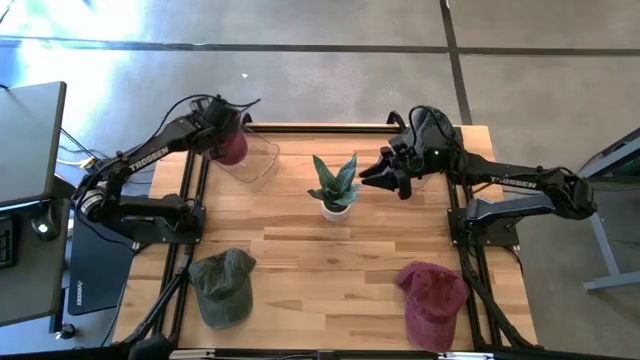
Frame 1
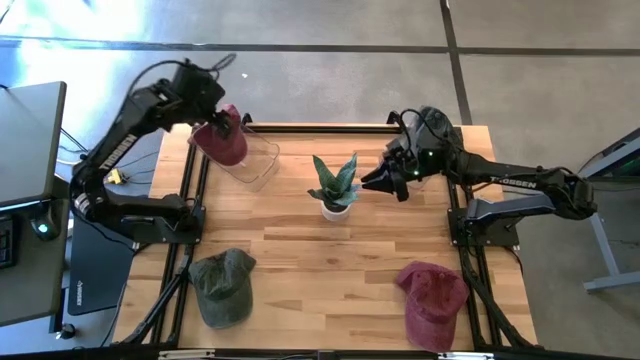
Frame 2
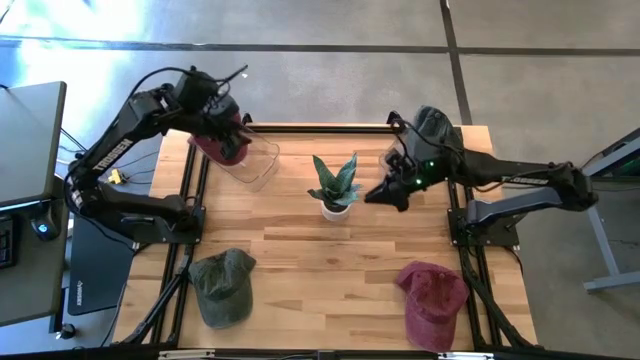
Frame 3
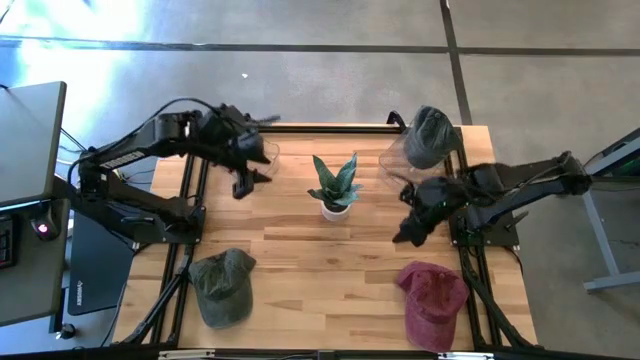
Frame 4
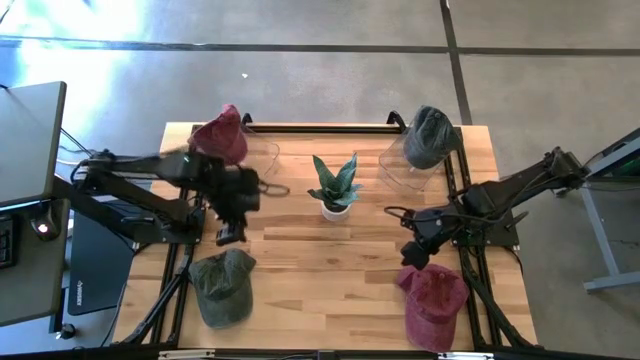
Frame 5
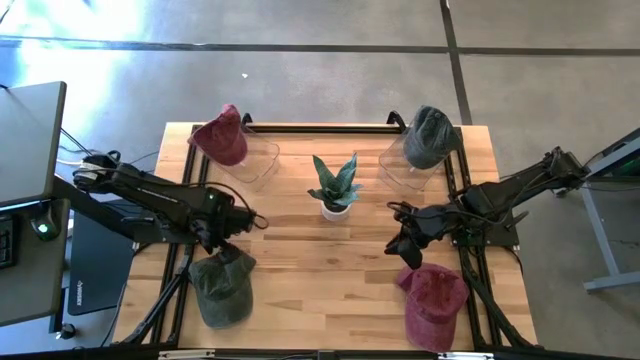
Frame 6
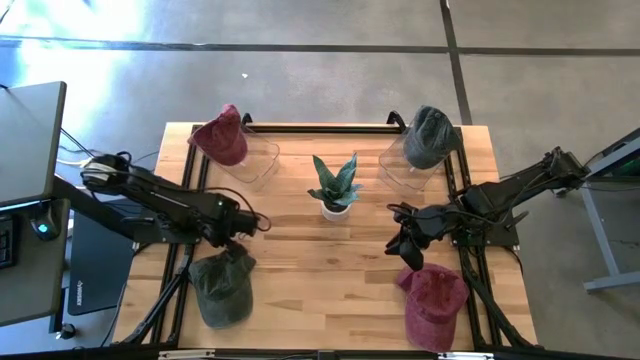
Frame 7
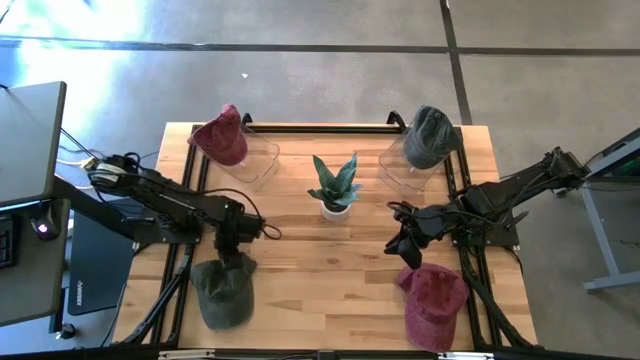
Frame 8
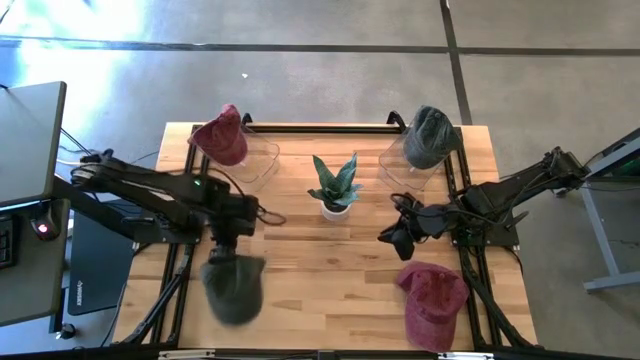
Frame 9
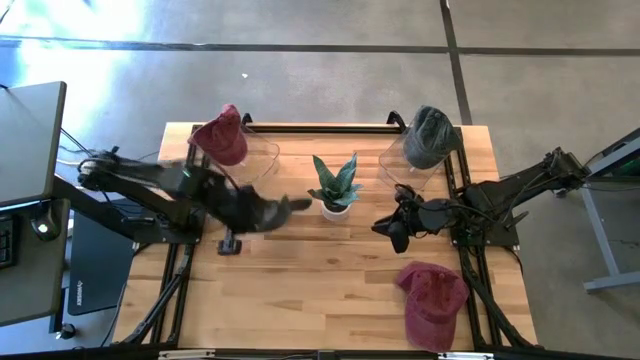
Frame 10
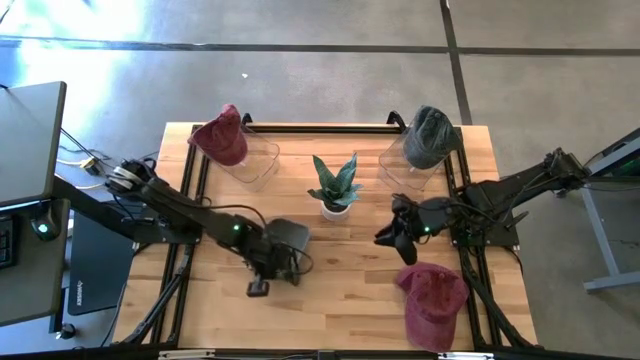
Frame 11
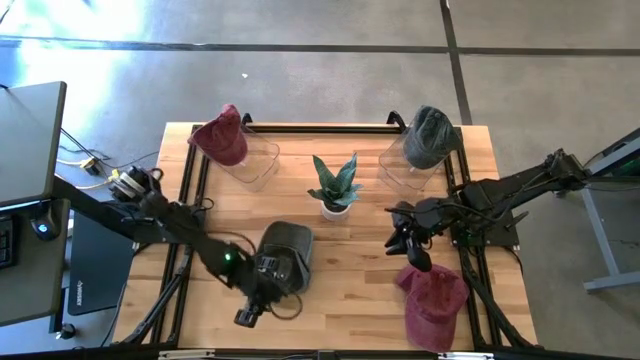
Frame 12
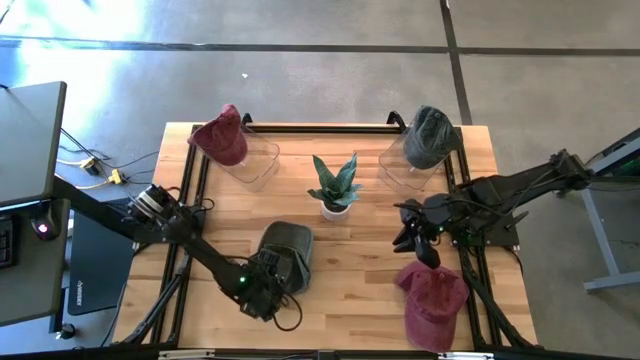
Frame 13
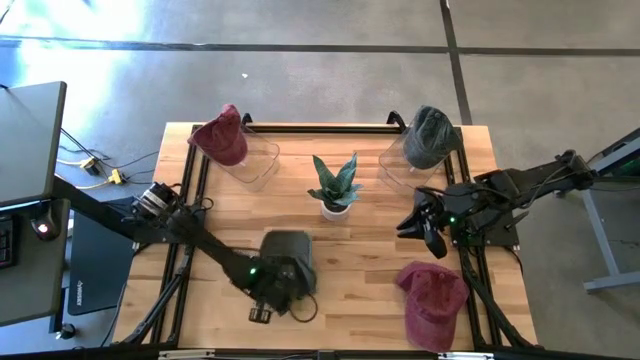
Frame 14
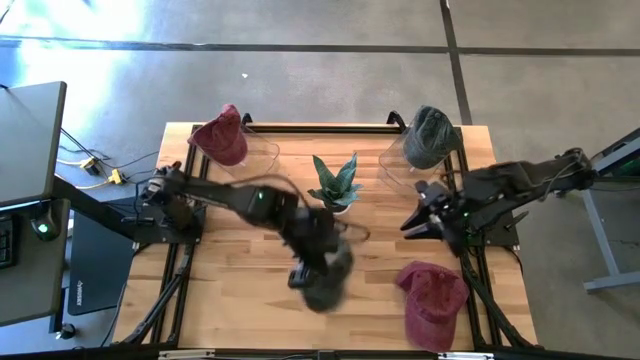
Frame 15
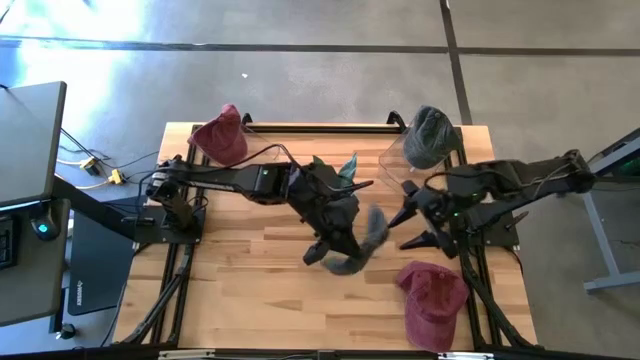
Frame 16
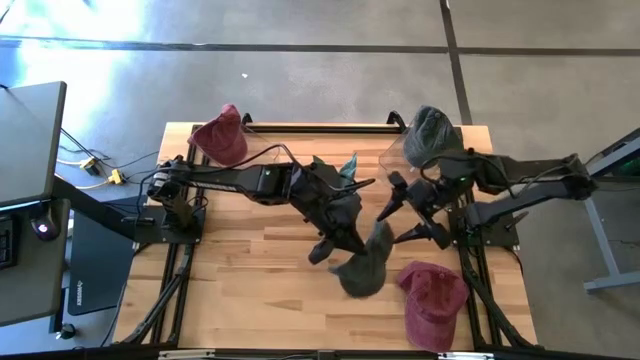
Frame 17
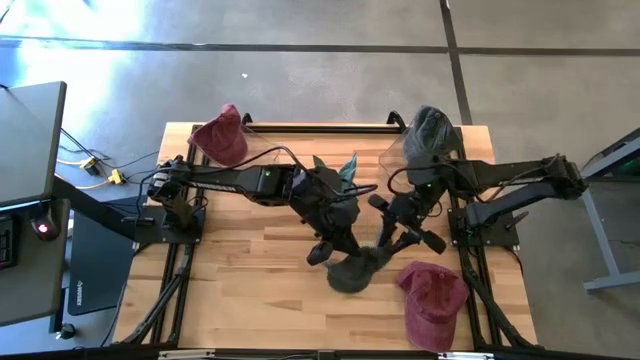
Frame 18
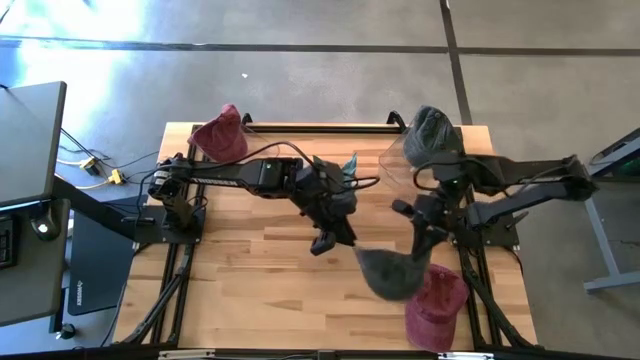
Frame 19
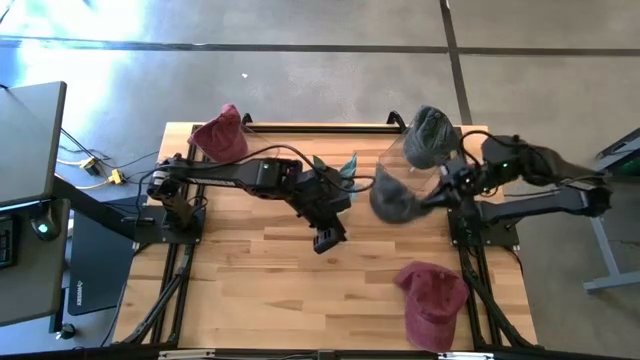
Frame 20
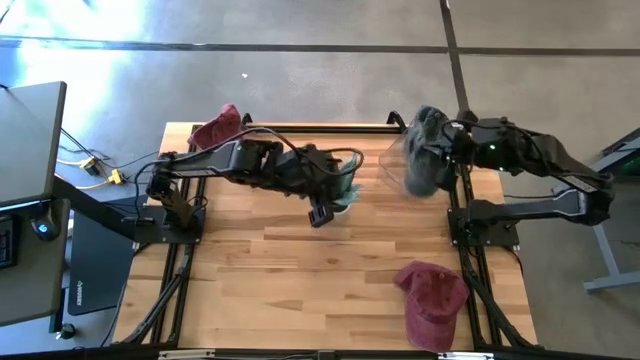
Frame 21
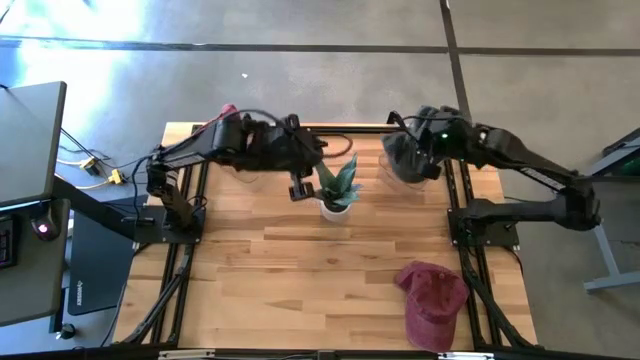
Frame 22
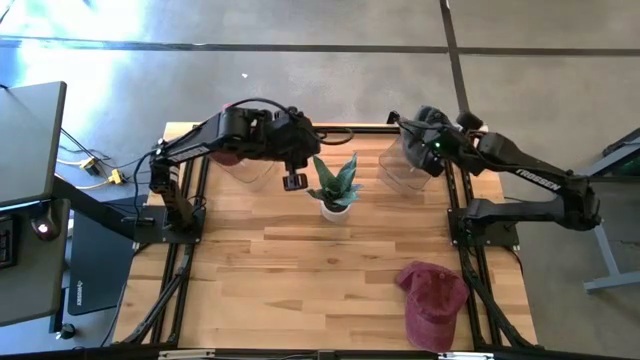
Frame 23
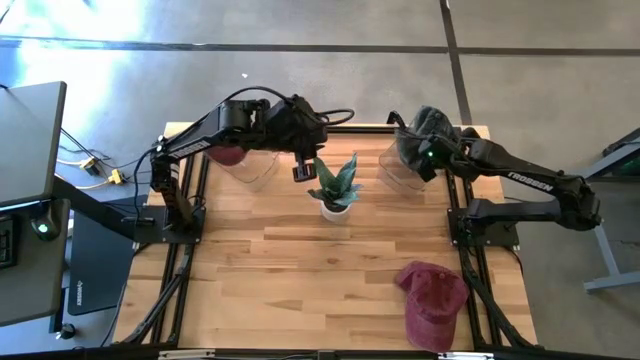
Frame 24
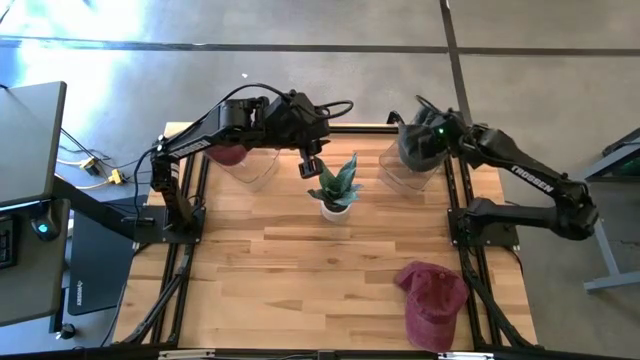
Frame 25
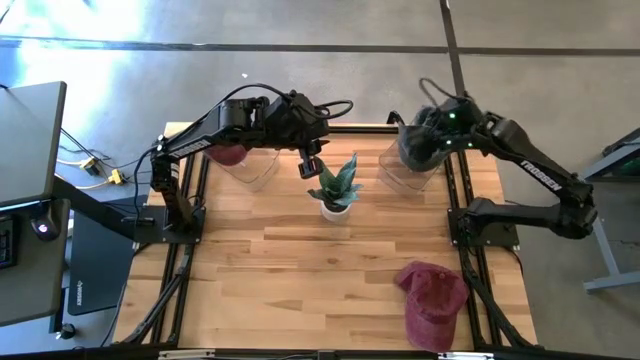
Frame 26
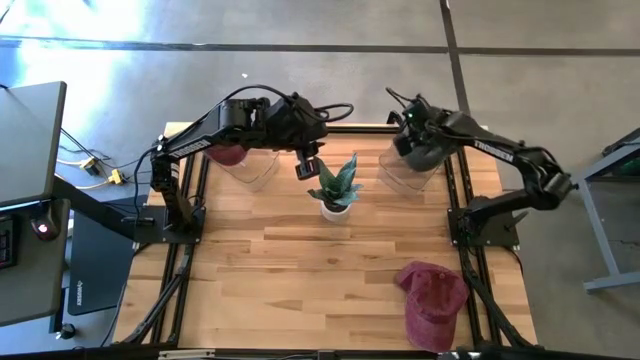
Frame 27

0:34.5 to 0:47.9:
Task: Pick & Place hat
Put the black cap into the right transparent bin

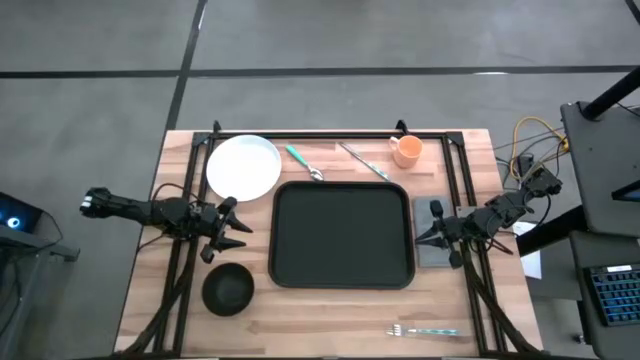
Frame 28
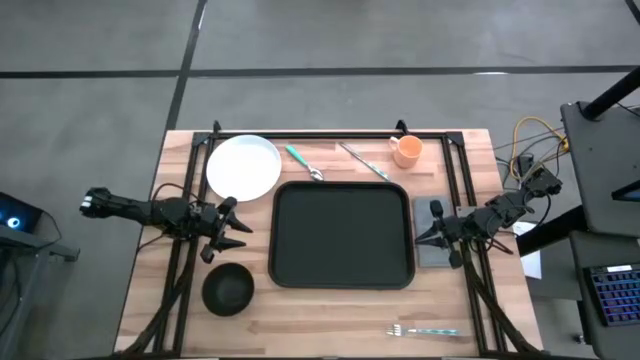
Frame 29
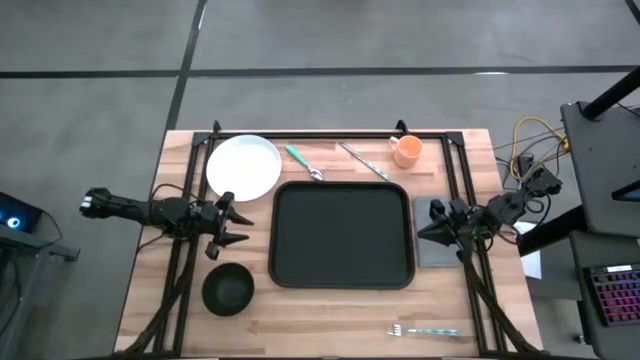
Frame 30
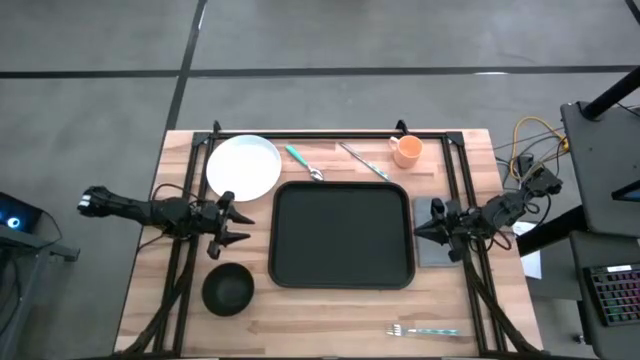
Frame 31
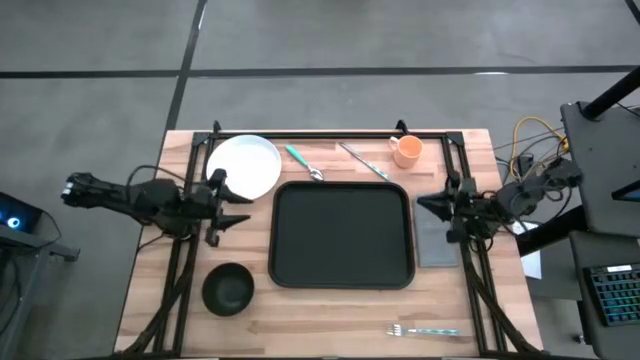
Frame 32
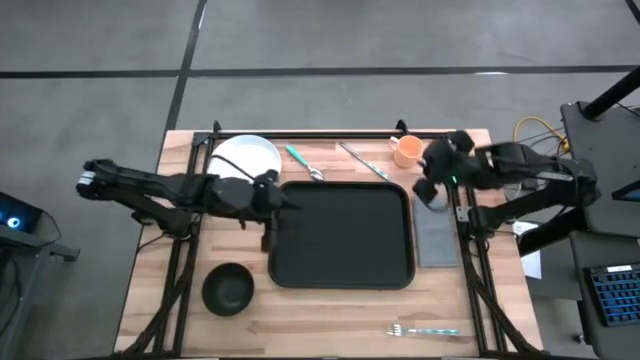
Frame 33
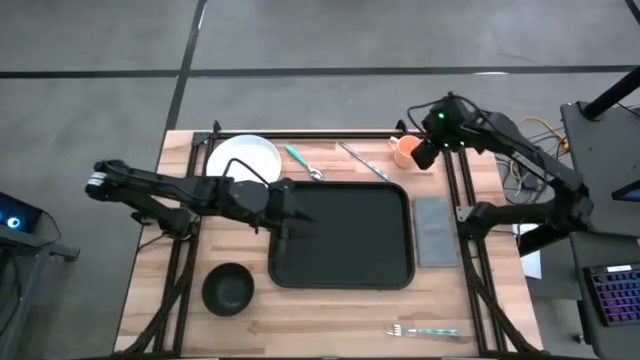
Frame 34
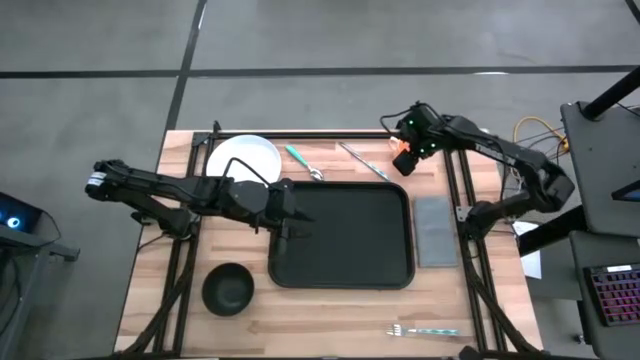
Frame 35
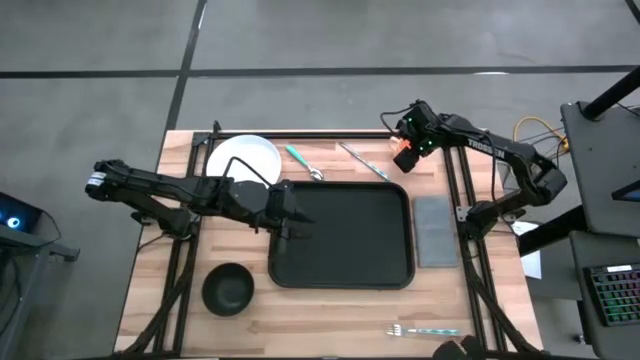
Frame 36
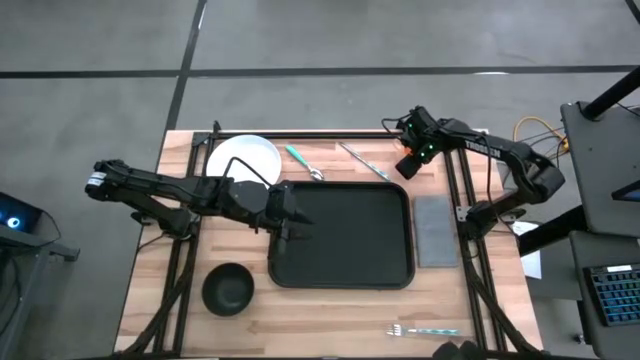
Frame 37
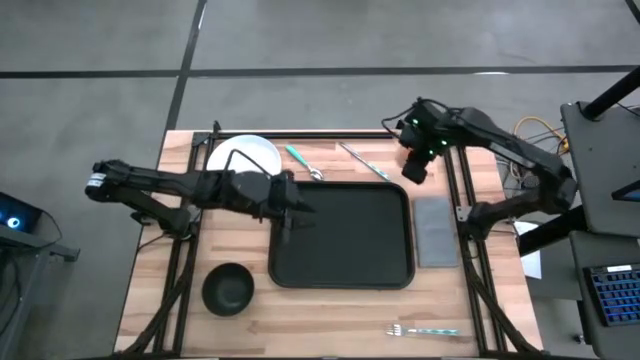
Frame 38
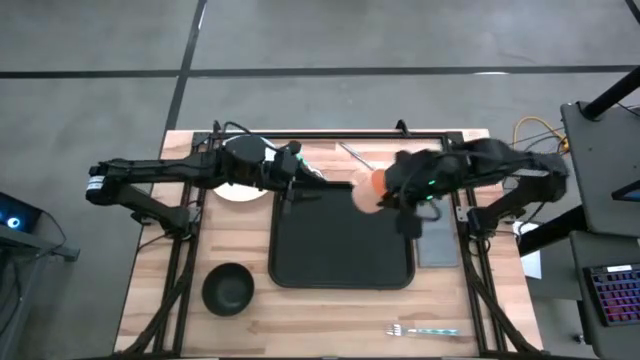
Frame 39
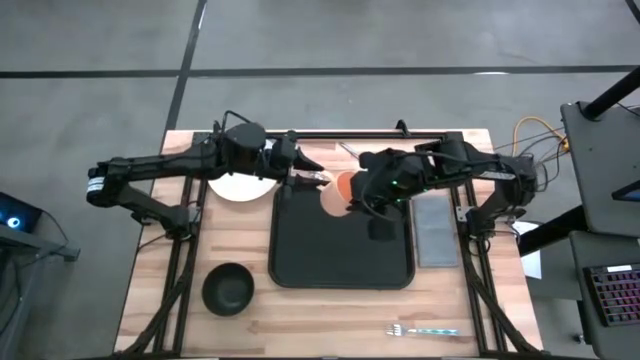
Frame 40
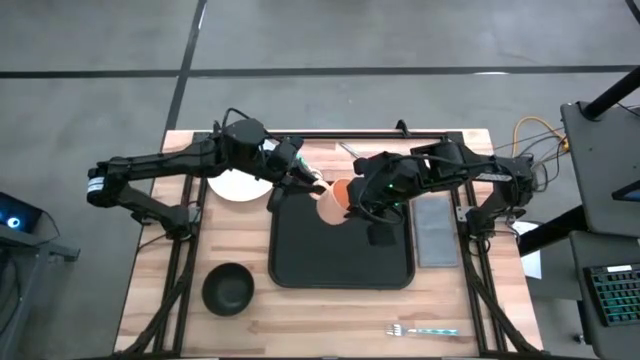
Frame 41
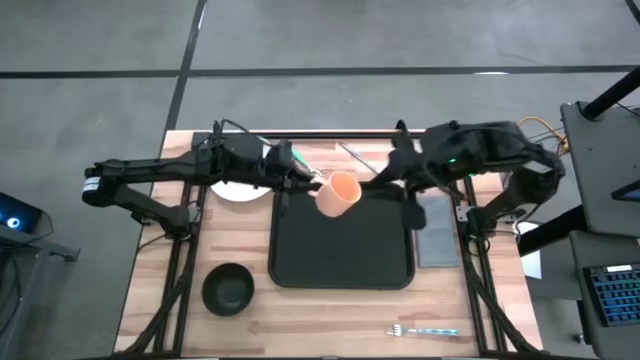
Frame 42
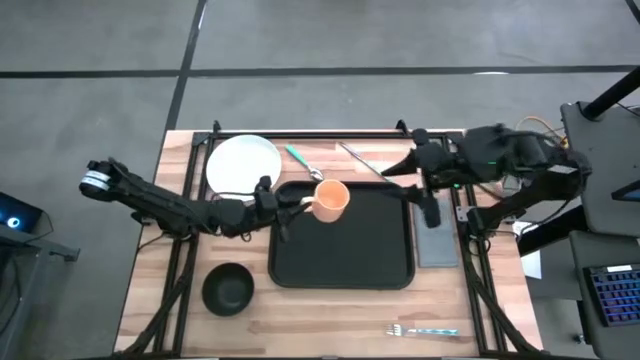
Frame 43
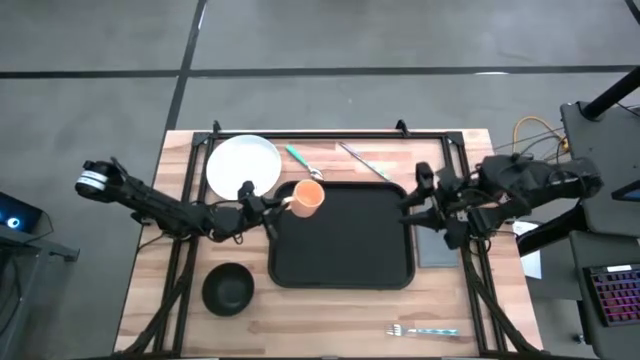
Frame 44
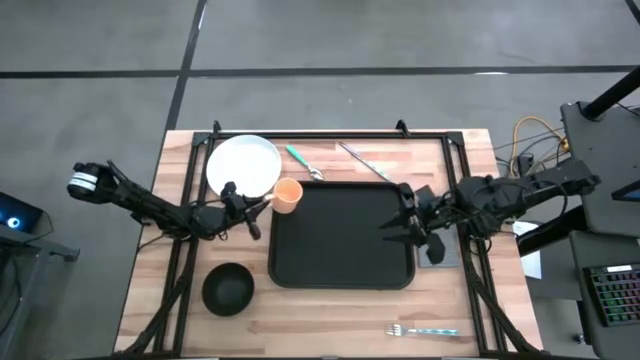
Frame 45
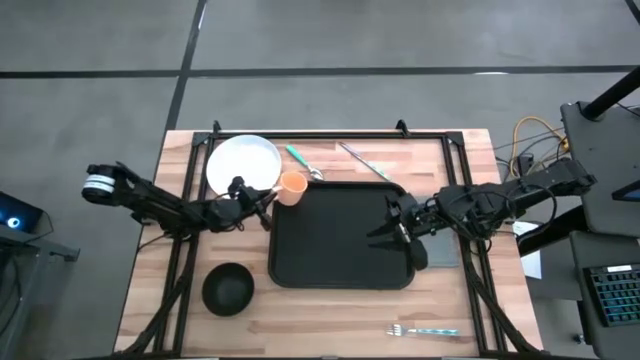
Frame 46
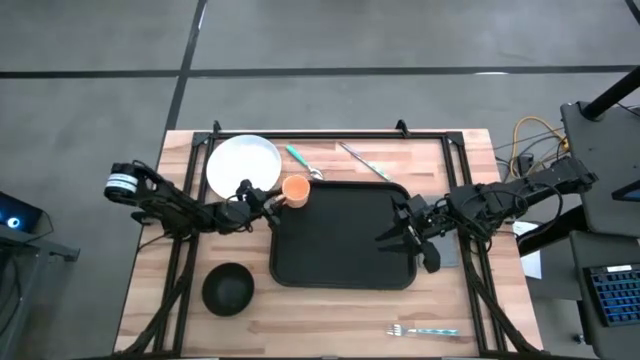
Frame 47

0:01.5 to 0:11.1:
Task: Set up tray
Put the orange mug on the top left of the black serving tray
